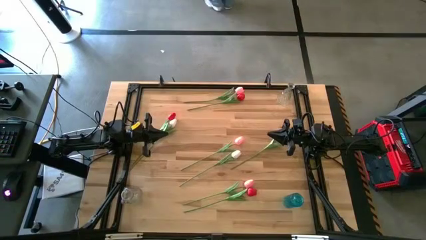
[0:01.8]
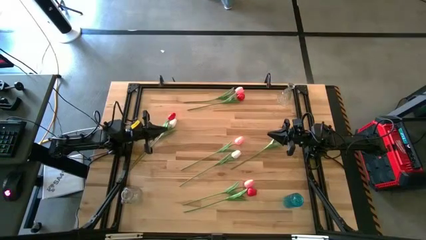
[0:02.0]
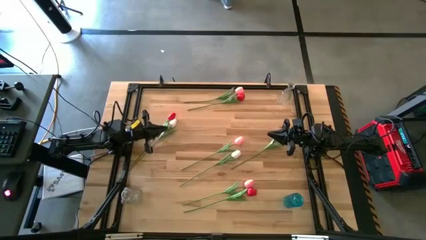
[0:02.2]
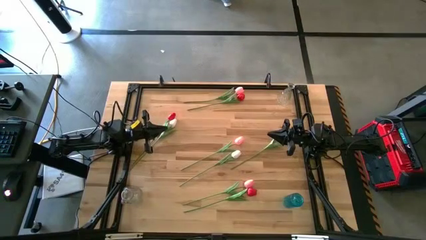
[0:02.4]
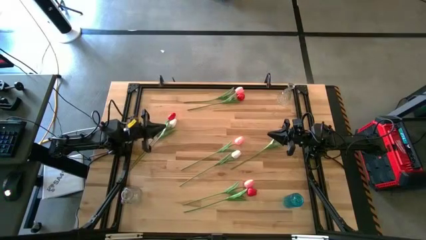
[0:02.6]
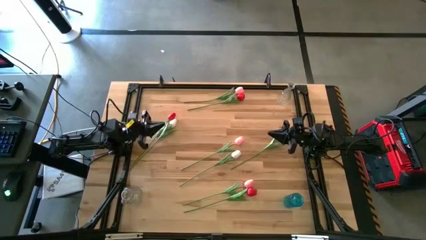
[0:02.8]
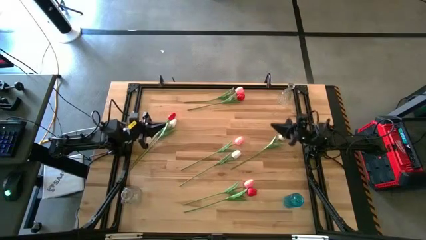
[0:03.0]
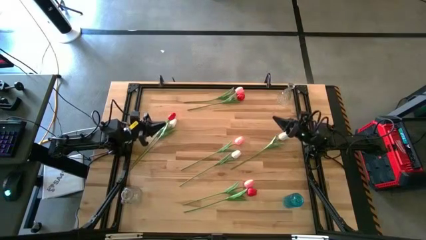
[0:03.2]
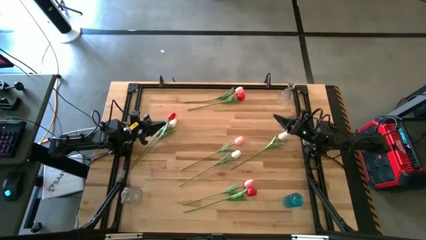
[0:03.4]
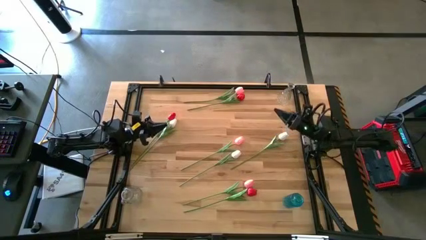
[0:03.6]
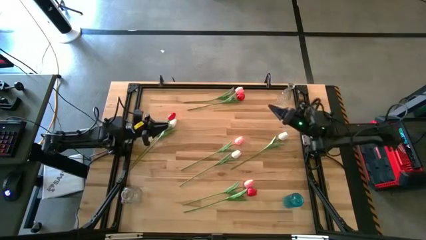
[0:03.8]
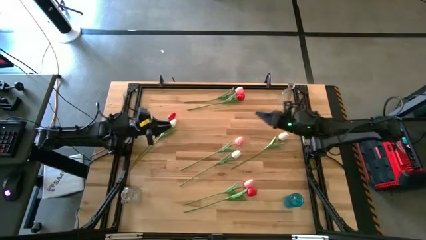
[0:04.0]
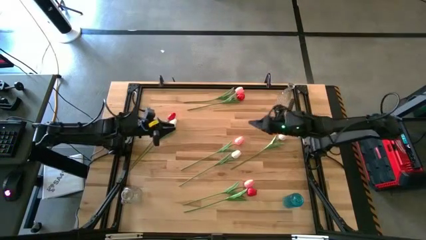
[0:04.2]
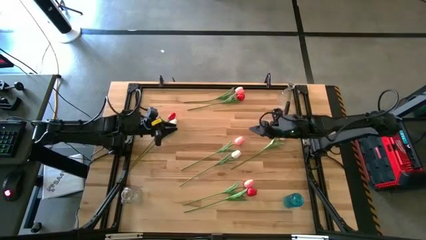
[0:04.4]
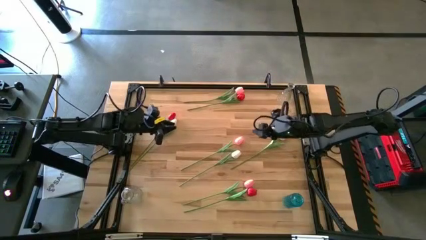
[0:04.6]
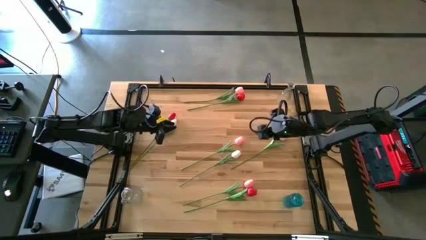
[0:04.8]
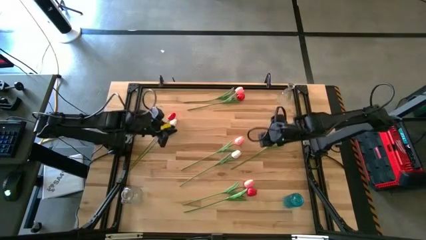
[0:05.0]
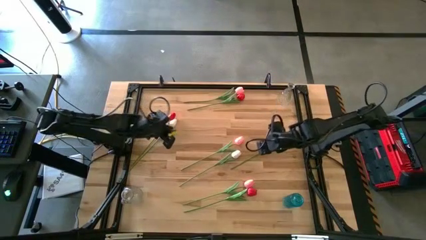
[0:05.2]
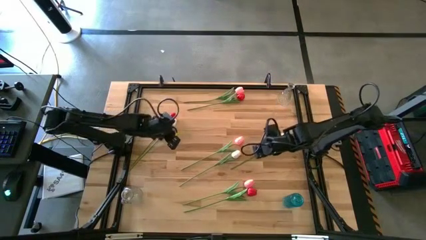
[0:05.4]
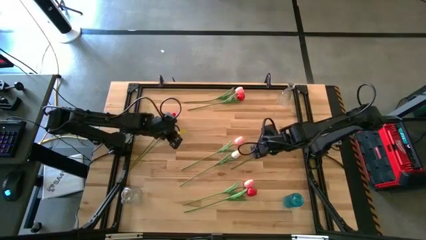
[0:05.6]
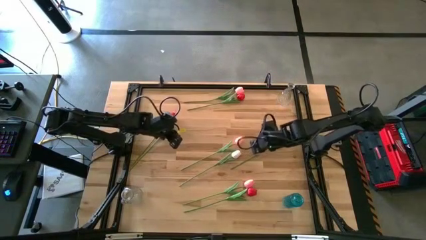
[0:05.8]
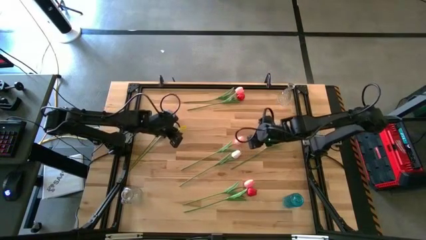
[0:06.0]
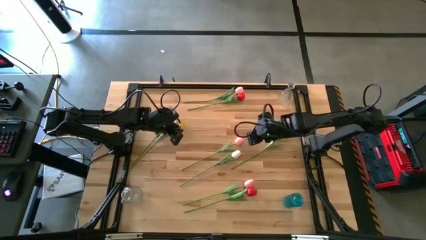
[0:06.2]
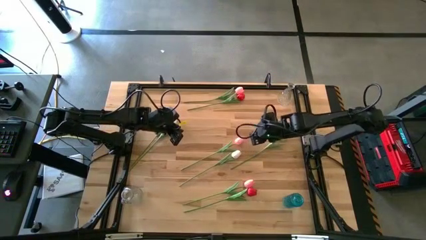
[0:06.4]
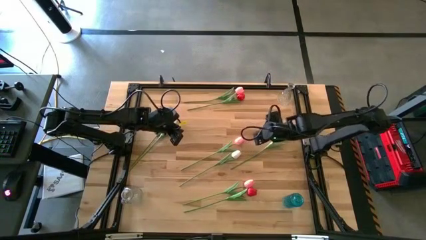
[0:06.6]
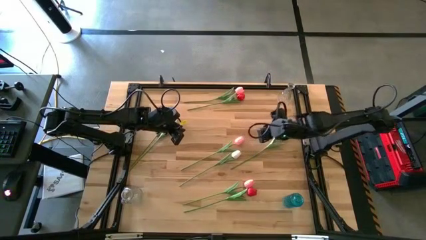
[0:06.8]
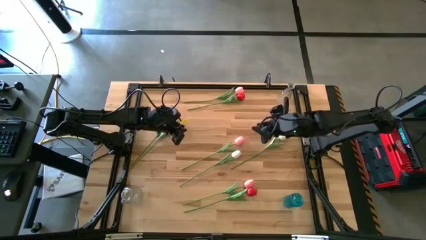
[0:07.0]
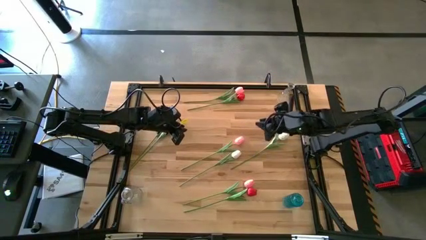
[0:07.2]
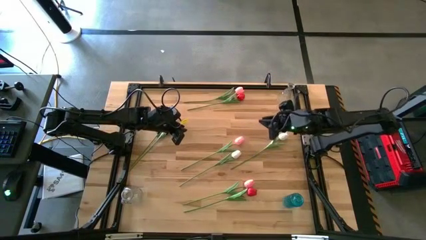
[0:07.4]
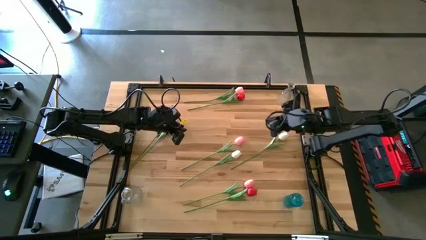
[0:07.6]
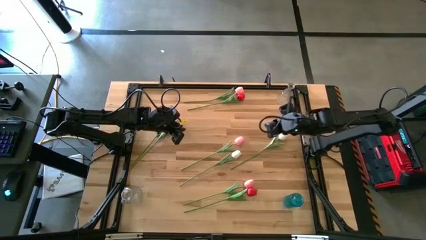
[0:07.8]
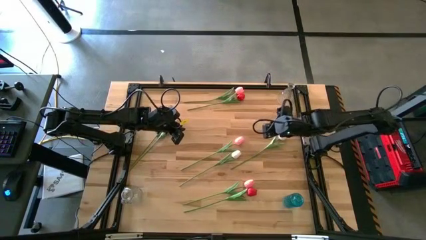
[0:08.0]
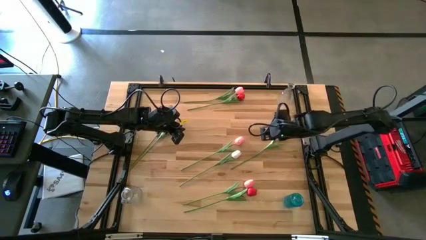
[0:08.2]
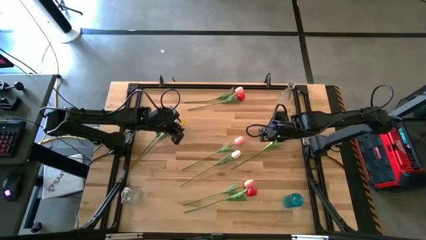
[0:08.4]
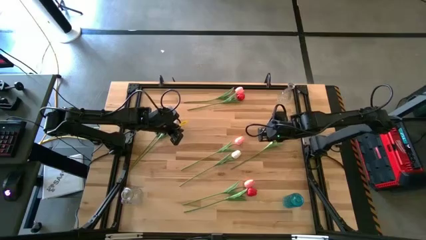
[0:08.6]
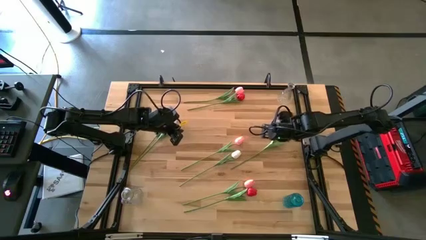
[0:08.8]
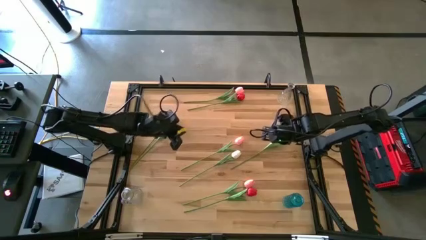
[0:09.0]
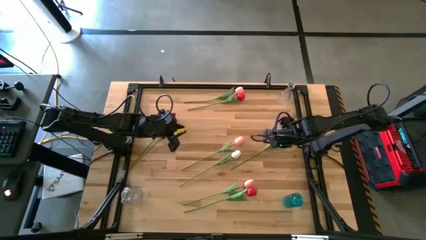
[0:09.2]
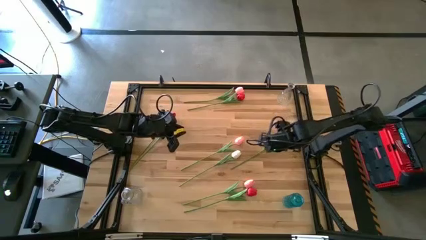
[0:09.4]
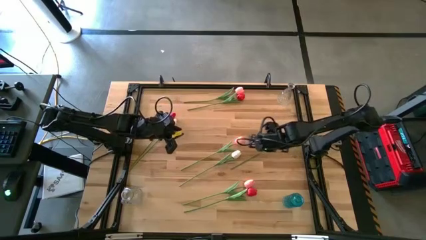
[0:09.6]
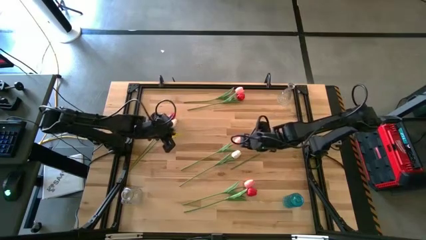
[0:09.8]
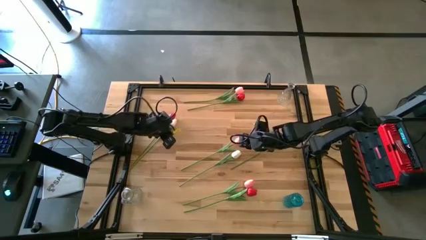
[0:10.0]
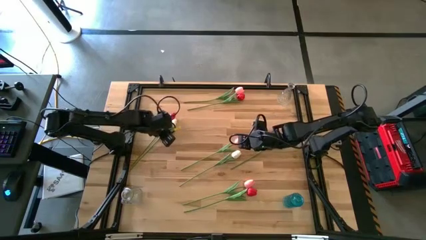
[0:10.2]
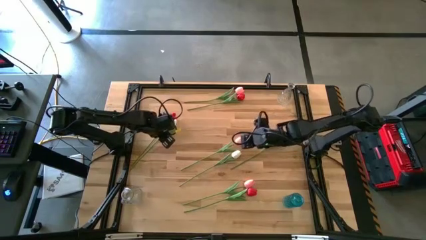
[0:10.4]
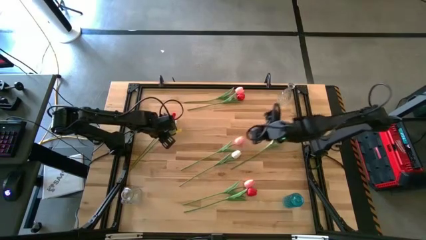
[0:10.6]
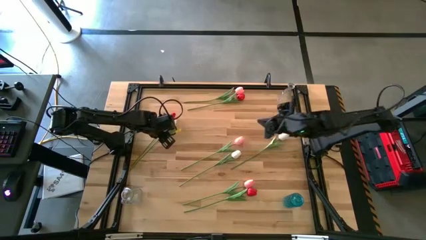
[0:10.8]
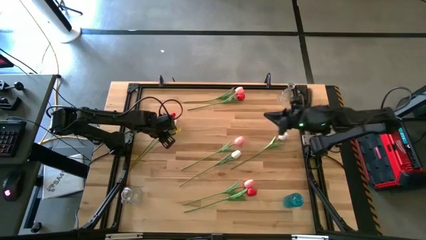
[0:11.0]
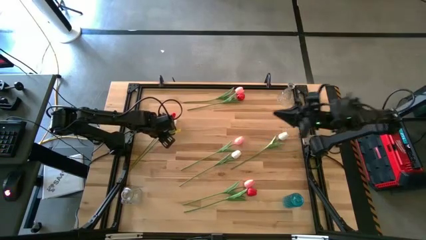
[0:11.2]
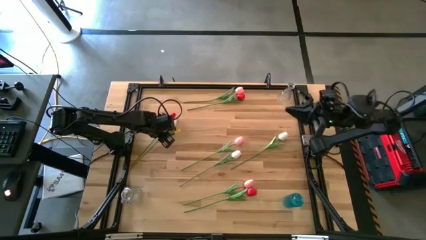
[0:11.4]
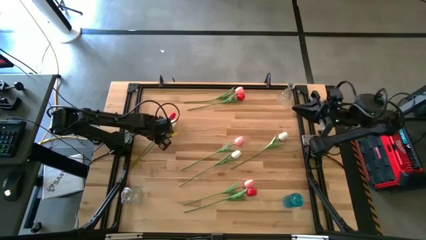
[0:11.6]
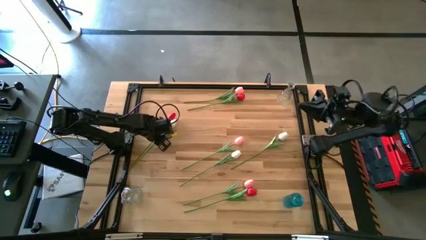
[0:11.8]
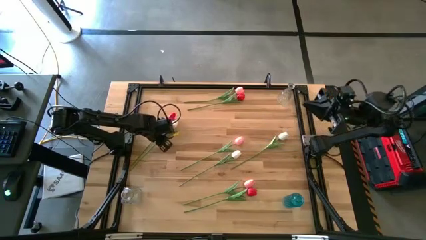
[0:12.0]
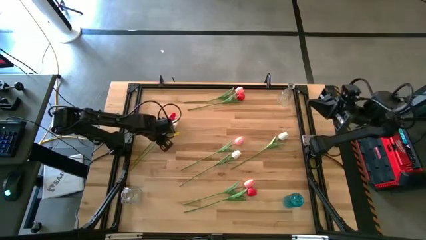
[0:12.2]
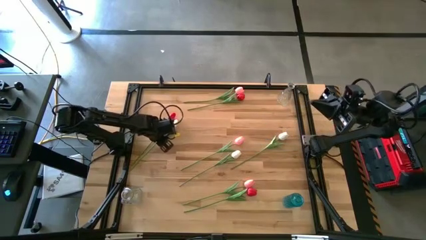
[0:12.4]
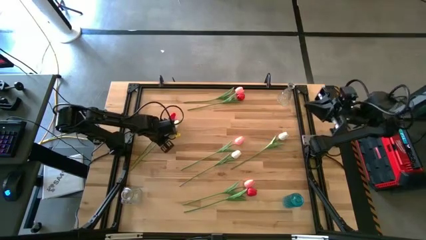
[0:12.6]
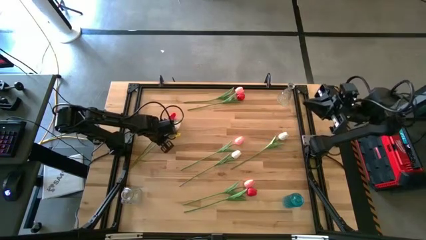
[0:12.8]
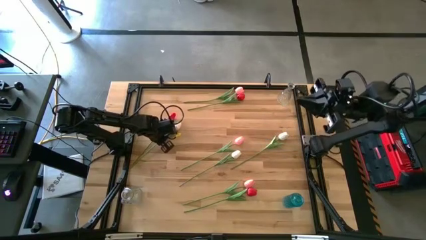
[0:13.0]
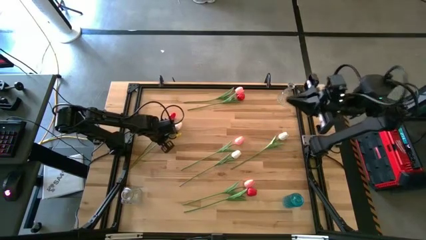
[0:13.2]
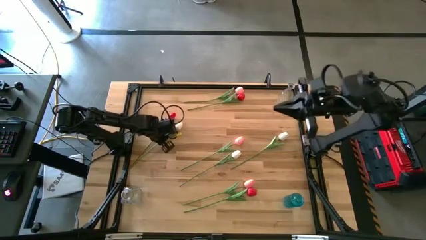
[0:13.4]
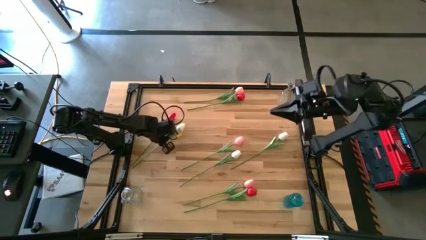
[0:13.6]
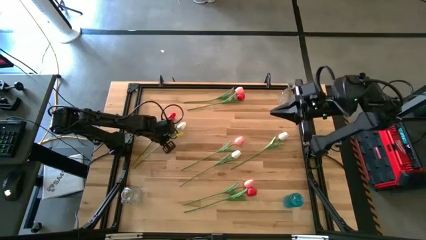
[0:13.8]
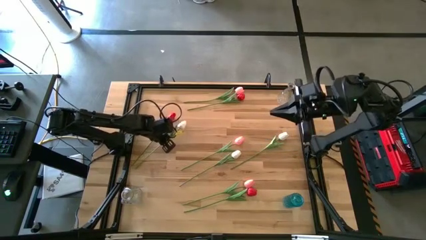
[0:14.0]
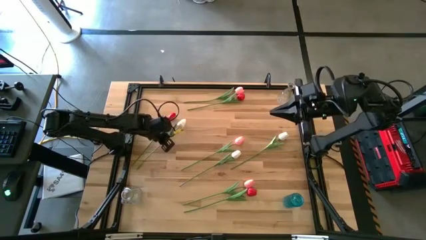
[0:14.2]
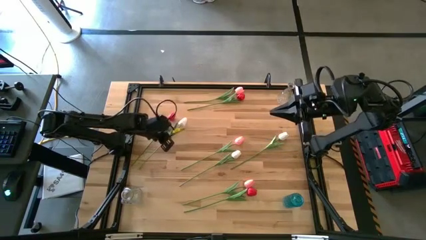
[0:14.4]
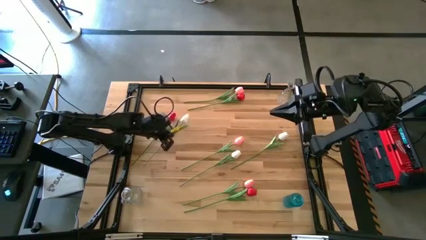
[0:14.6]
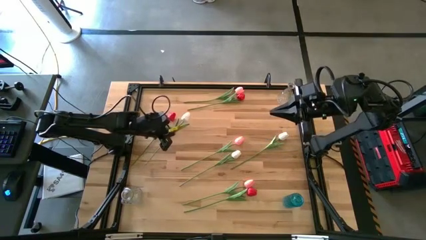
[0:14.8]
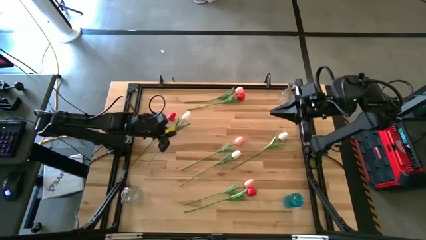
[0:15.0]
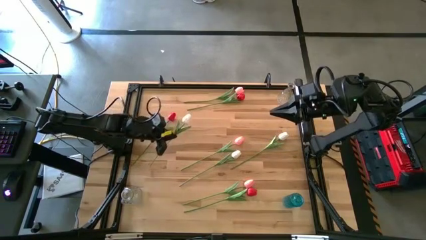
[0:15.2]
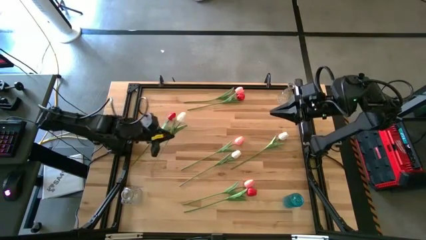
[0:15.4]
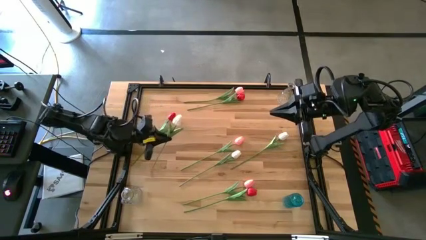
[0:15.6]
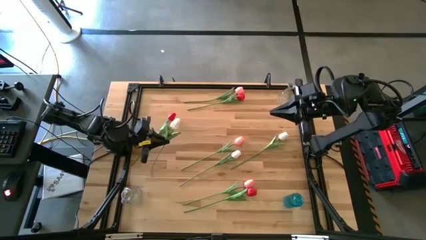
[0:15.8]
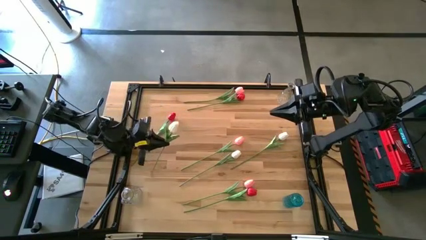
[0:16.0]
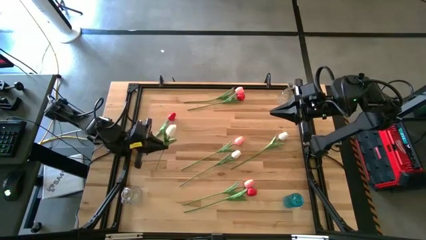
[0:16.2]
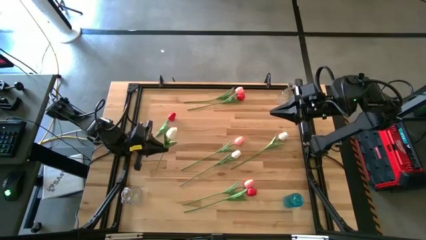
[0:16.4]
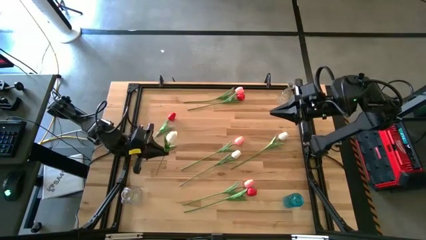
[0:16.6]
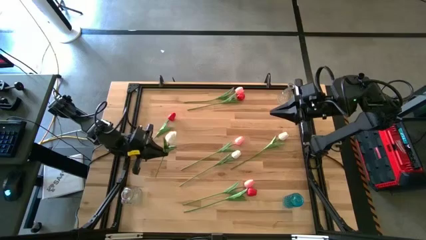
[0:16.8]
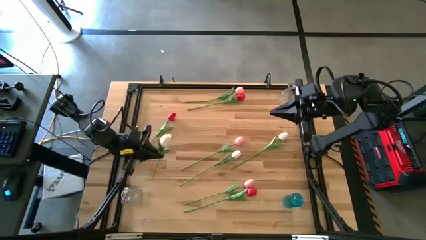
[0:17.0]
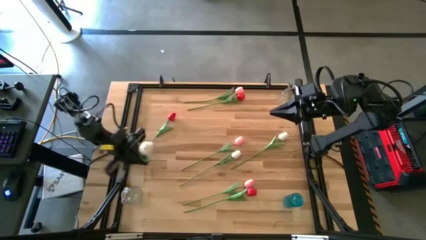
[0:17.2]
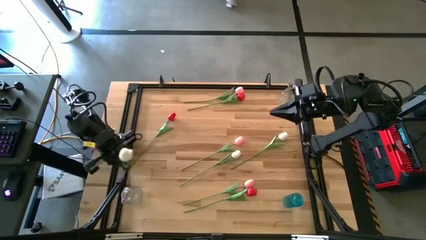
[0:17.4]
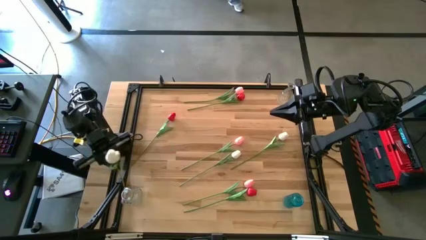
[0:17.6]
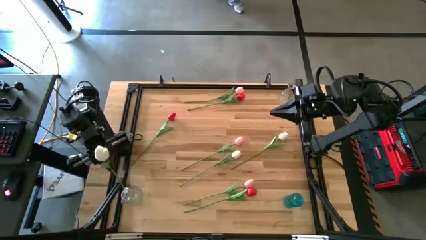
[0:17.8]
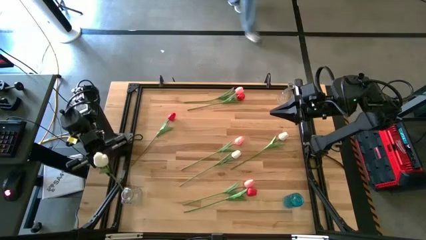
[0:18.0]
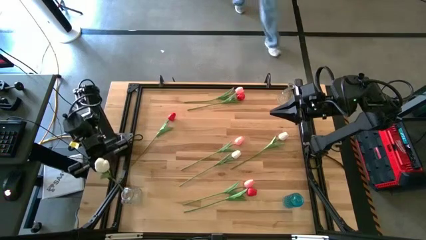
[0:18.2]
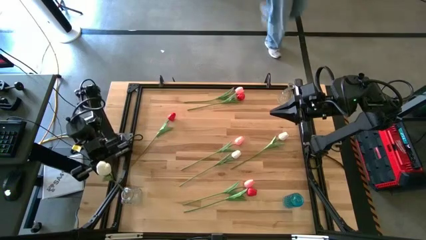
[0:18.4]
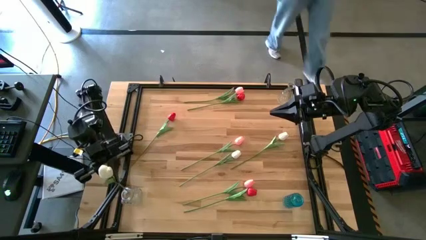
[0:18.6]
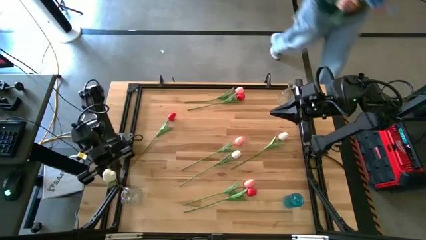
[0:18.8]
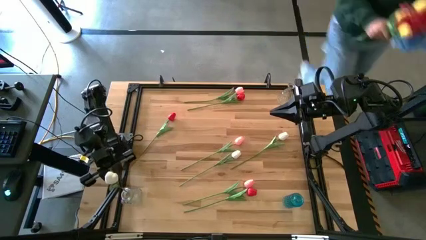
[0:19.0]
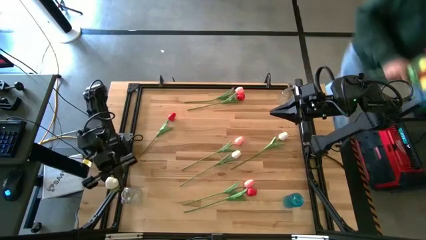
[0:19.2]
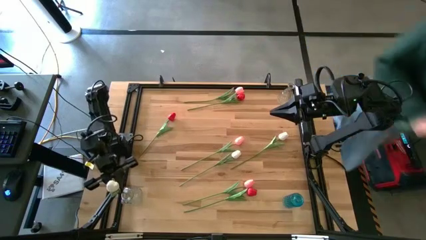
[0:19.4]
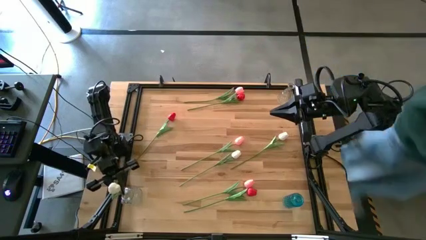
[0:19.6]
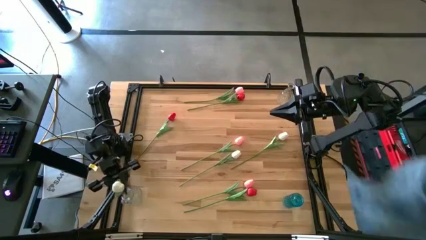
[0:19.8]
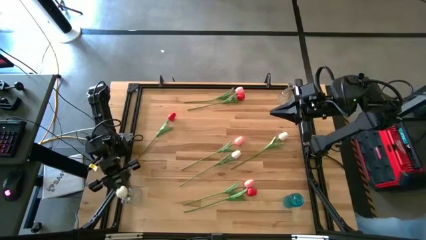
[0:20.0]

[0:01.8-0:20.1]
Task: Sort flowers into vase by color
Put the top right white flower into the bottom transparent vase
